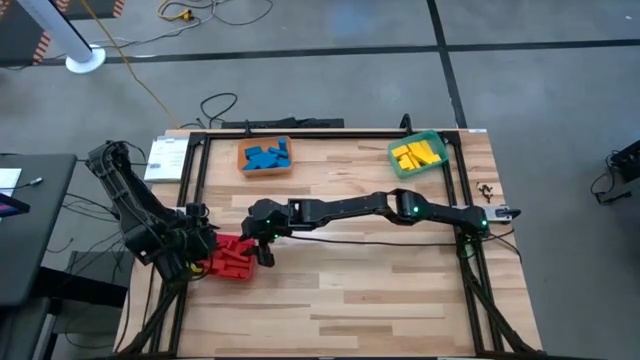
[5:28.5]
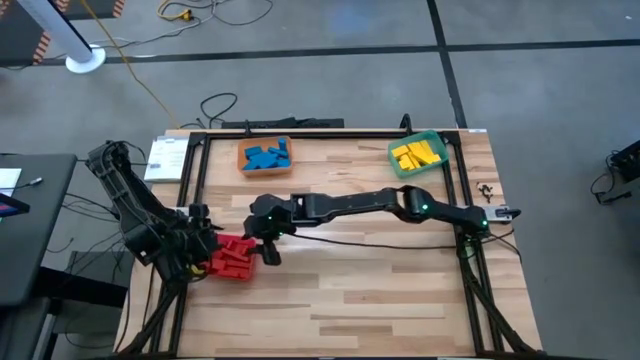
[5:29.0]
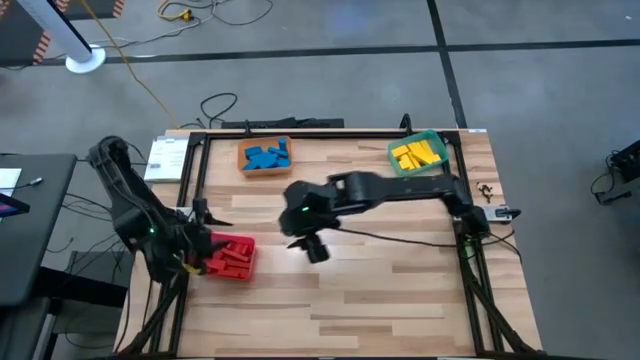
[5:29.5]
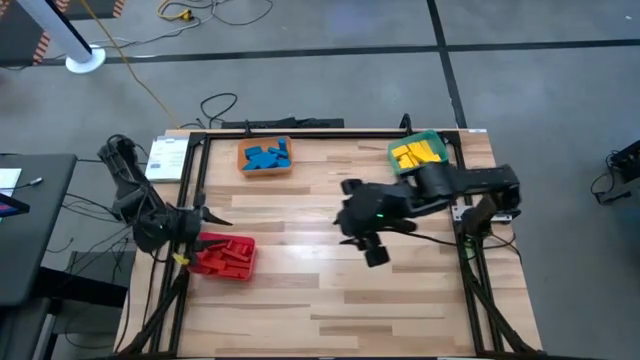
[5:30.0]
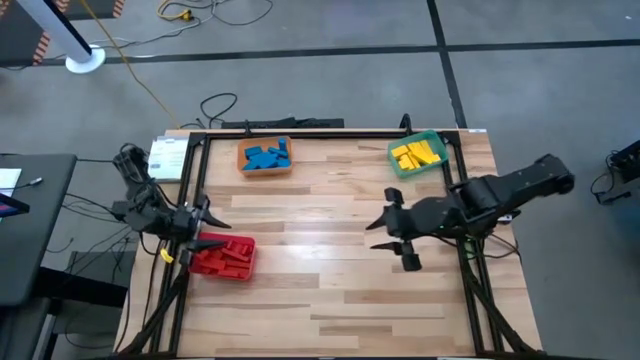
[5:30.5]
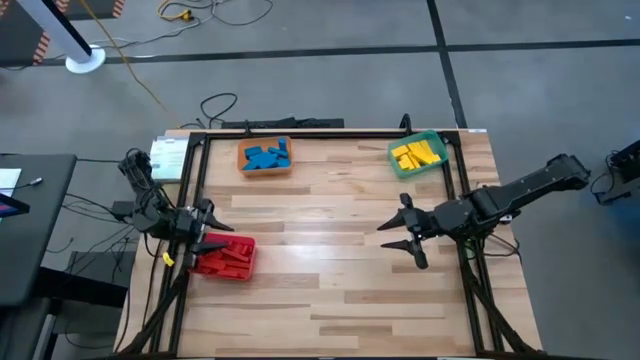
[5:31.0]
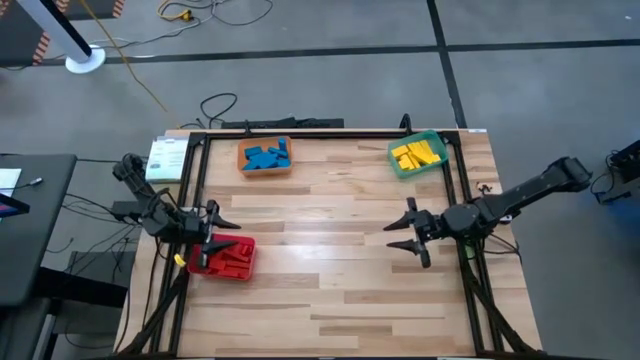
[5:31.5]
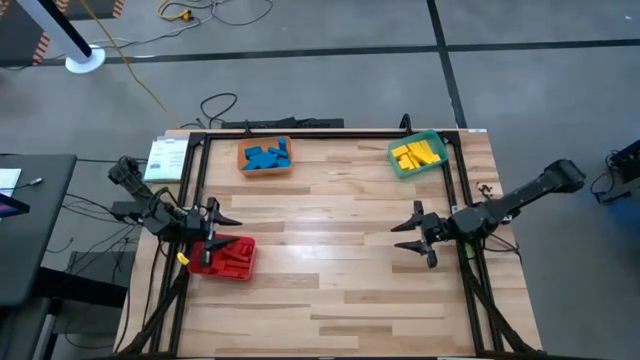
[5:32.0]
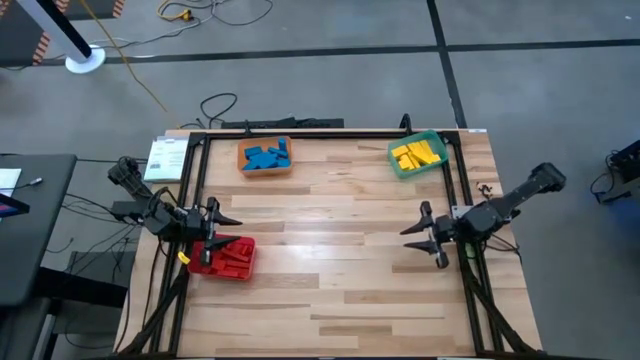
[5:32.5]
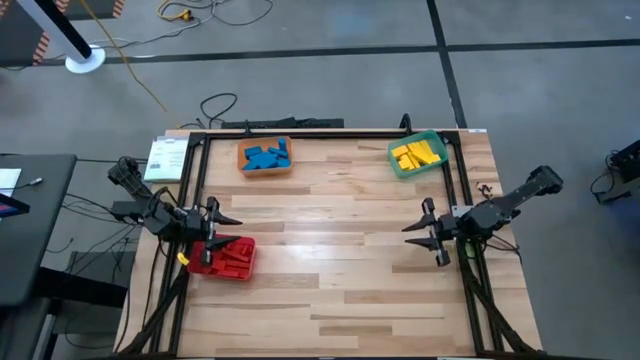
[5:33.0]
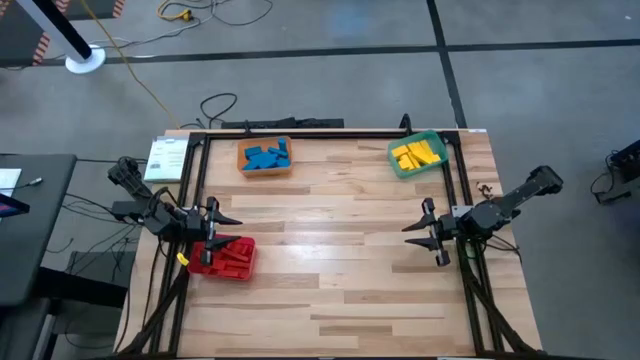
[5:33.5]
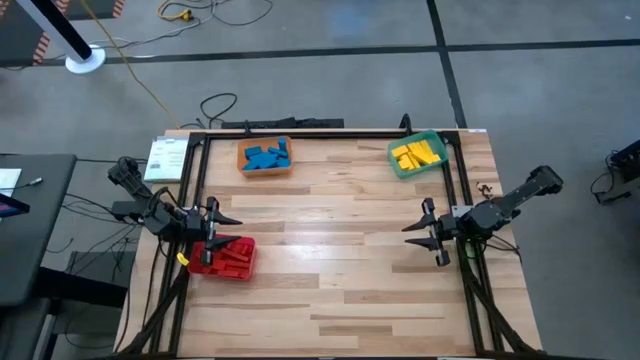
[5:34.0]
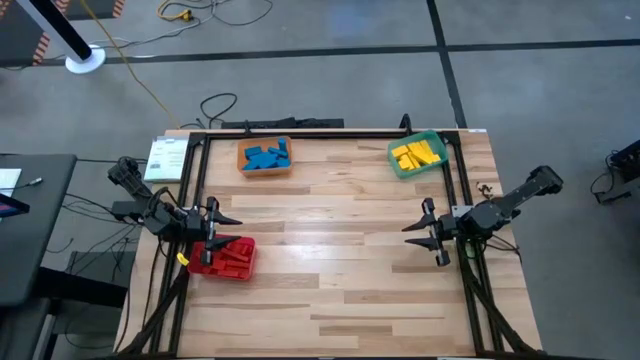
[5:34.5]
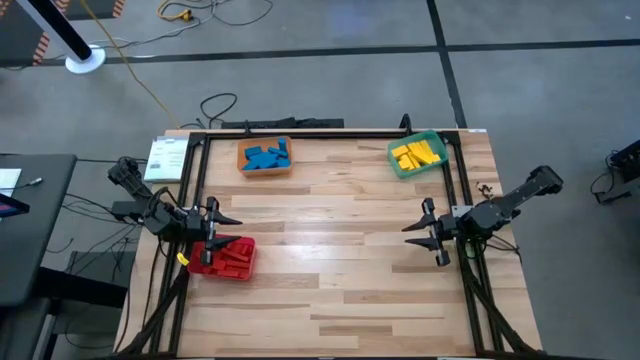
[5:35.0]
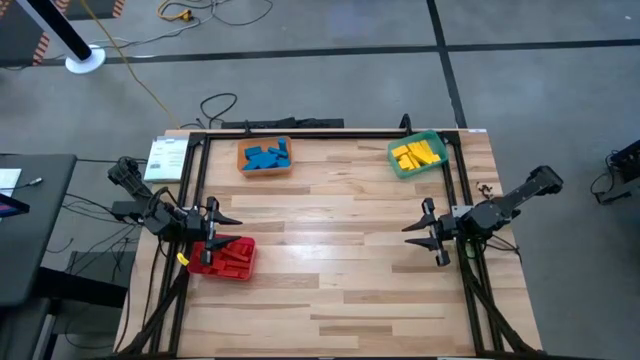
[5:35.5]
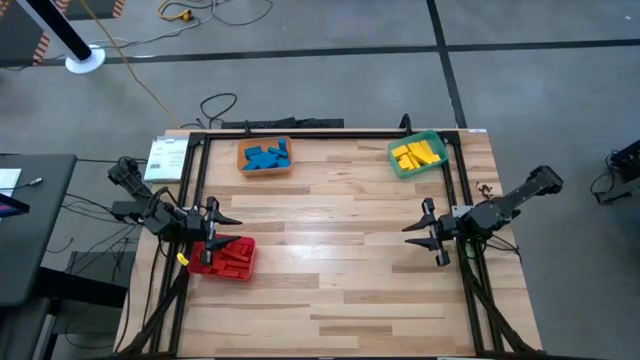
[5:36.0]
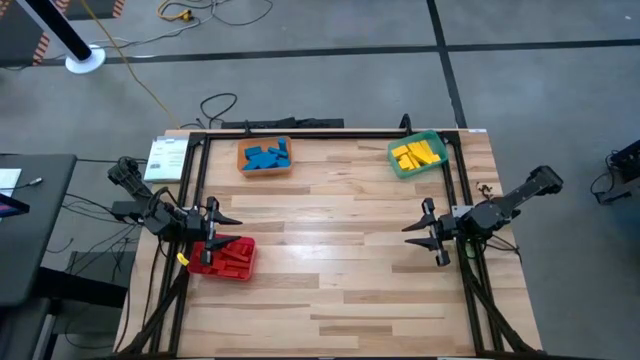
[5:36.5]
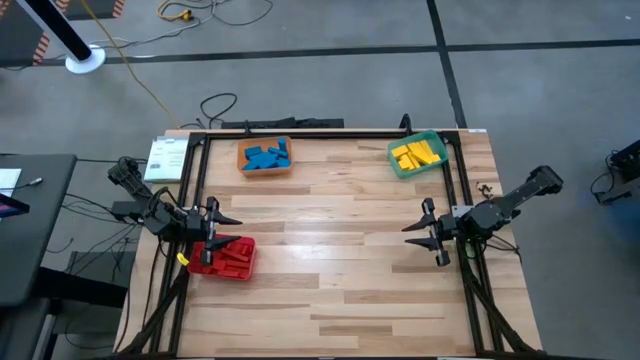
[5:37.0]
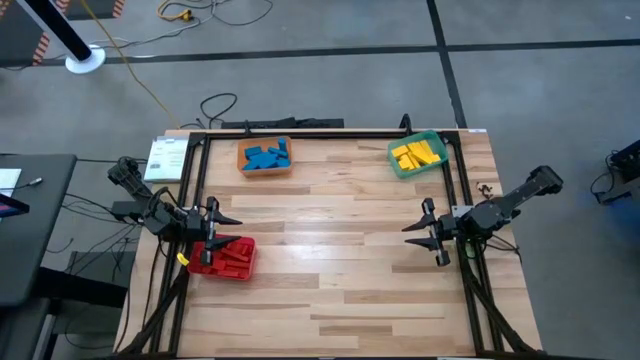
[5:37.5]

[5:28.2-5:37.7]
Task: Sort blocks
Return to Home Position

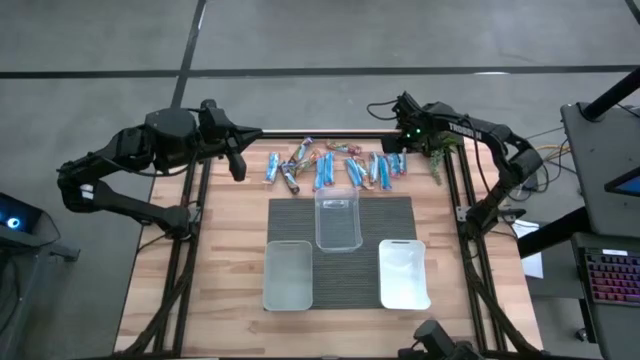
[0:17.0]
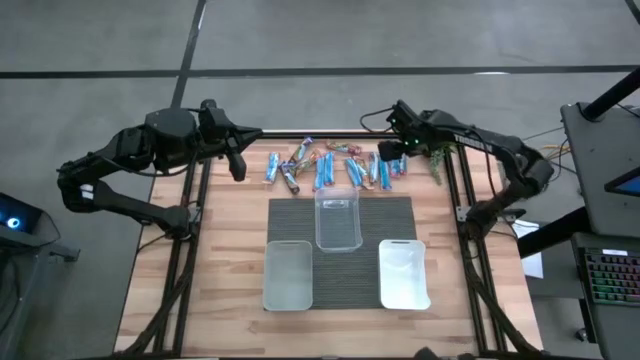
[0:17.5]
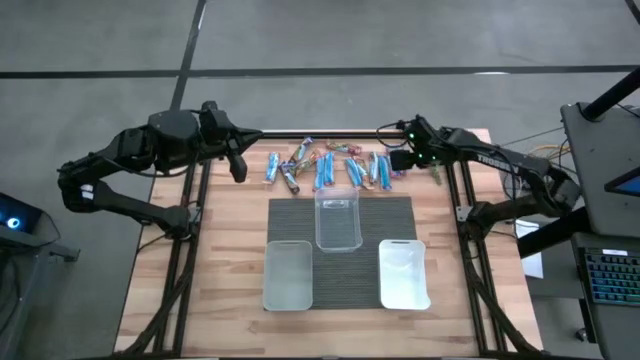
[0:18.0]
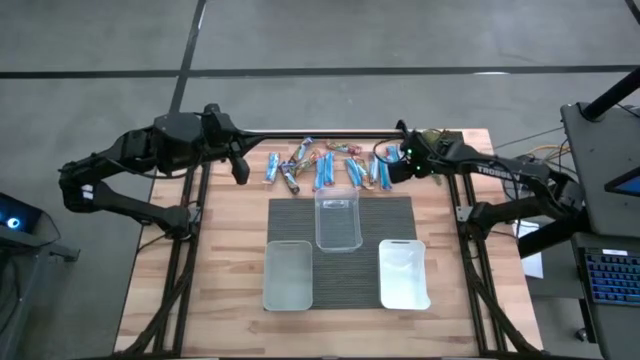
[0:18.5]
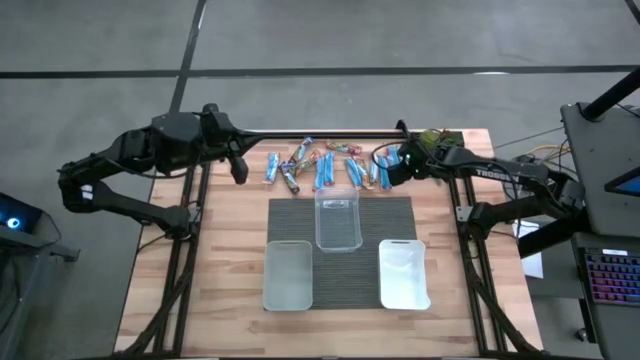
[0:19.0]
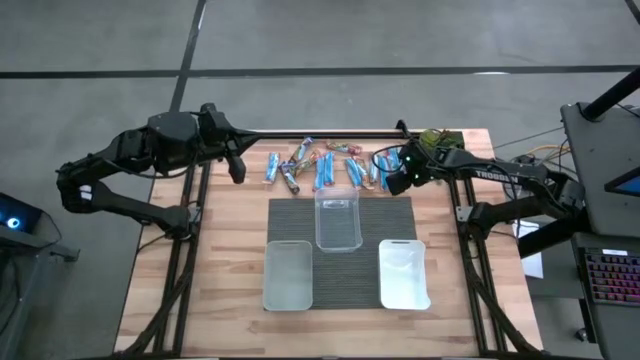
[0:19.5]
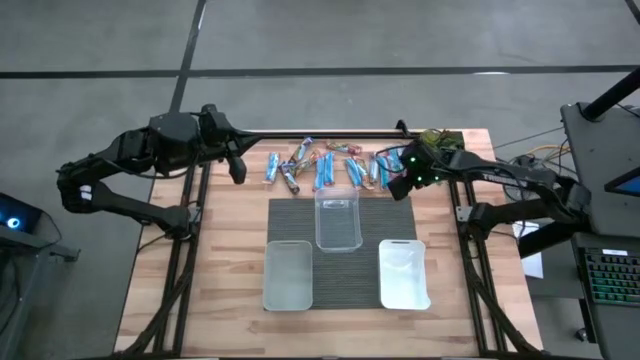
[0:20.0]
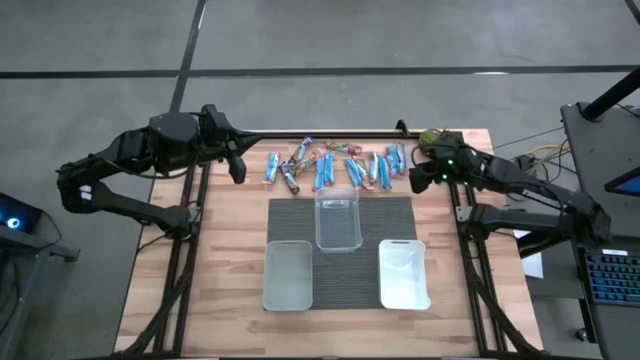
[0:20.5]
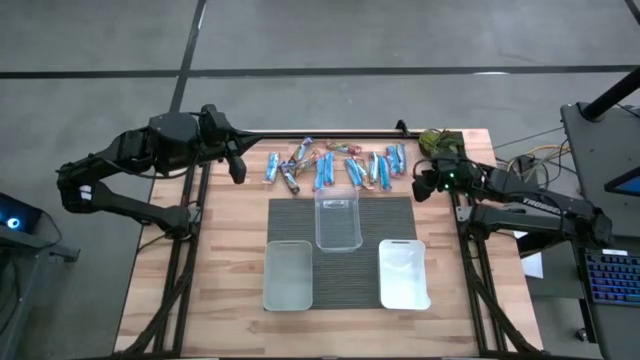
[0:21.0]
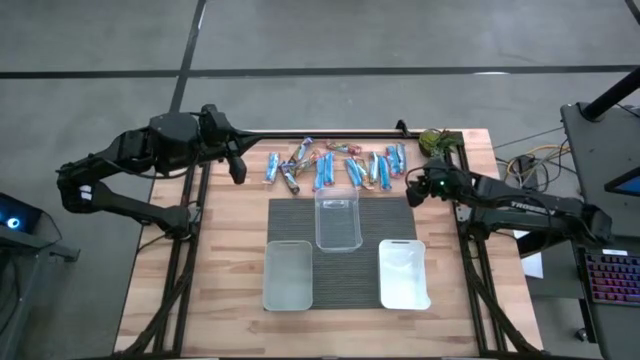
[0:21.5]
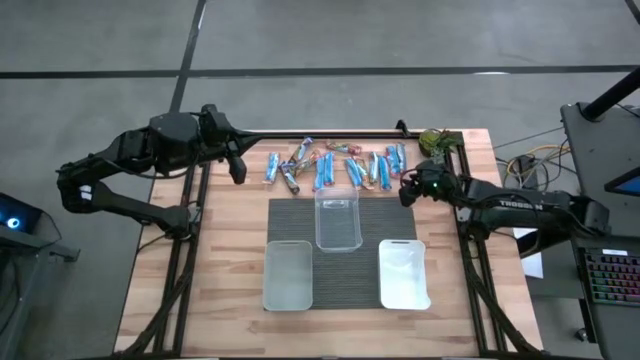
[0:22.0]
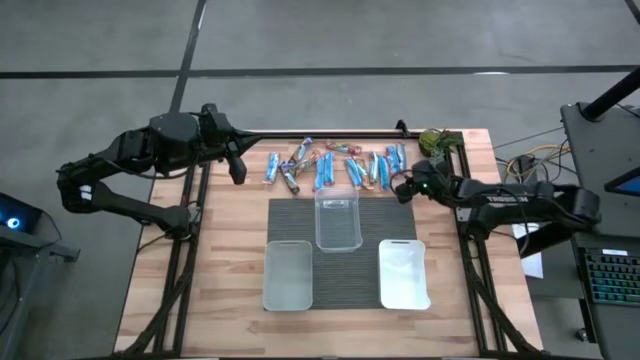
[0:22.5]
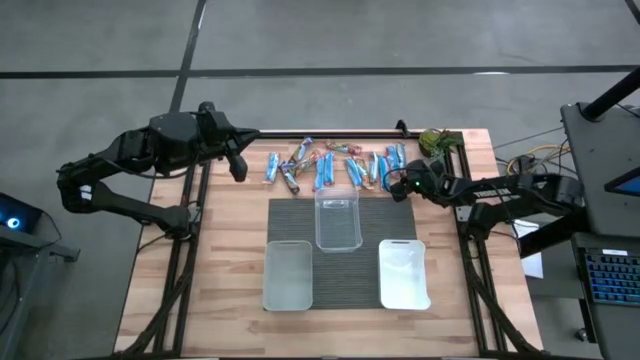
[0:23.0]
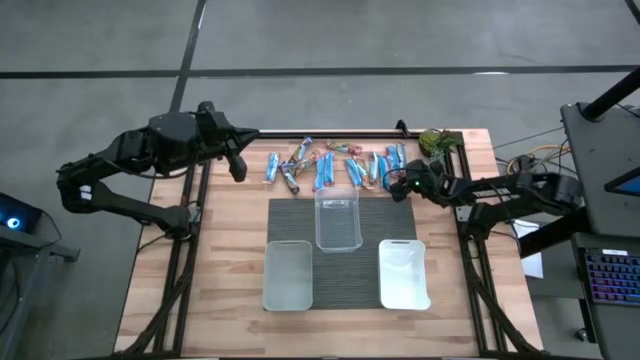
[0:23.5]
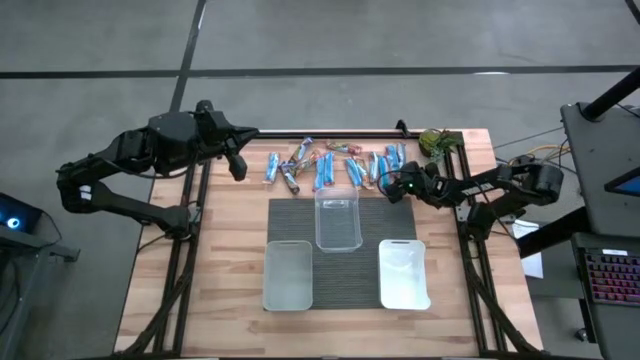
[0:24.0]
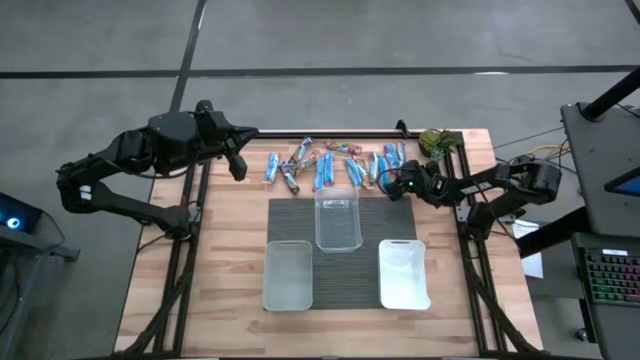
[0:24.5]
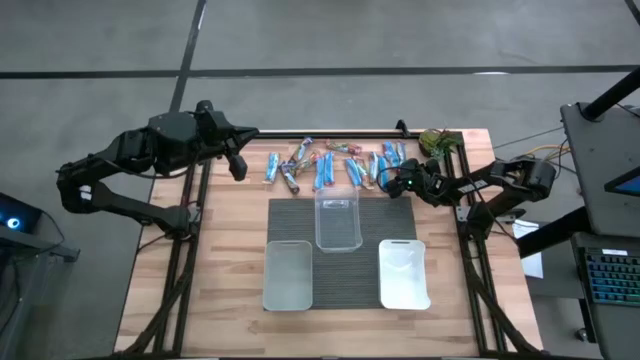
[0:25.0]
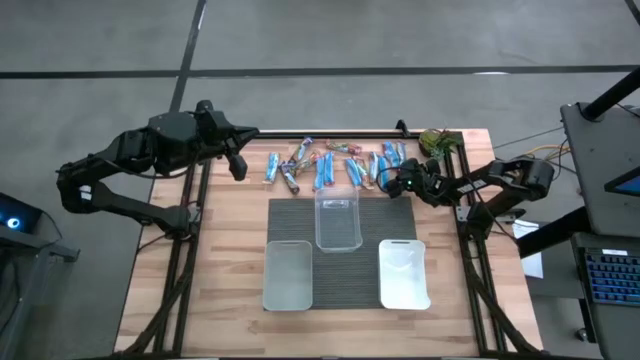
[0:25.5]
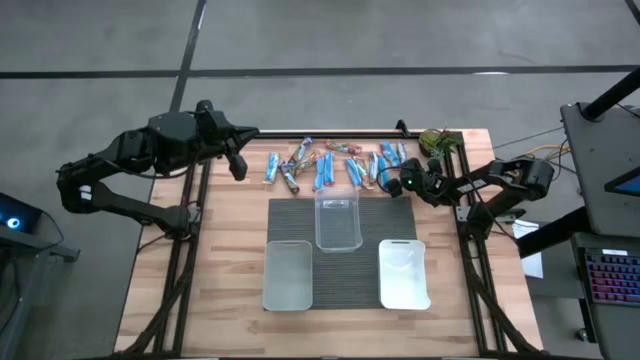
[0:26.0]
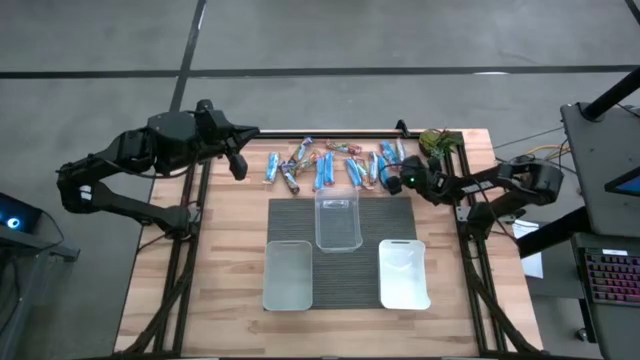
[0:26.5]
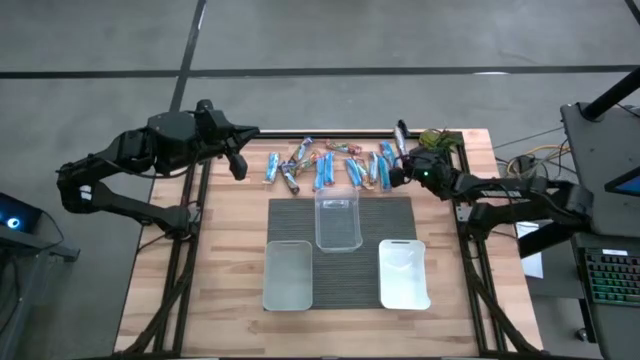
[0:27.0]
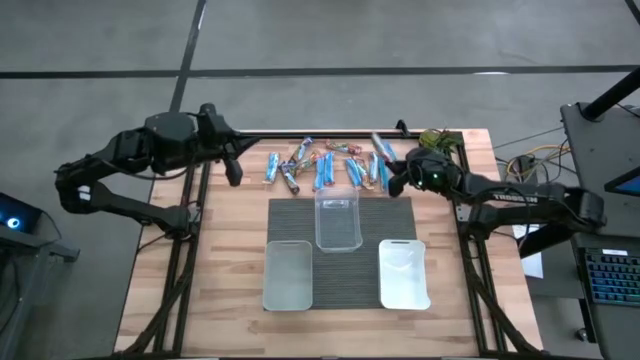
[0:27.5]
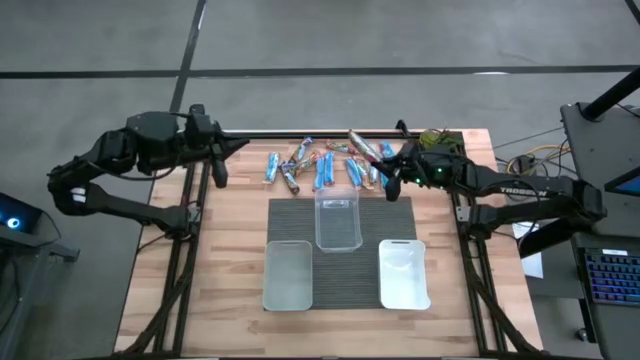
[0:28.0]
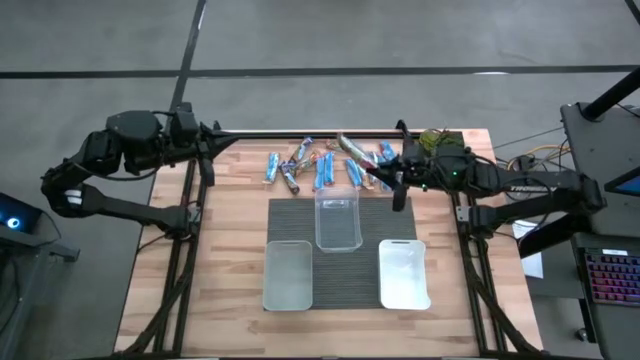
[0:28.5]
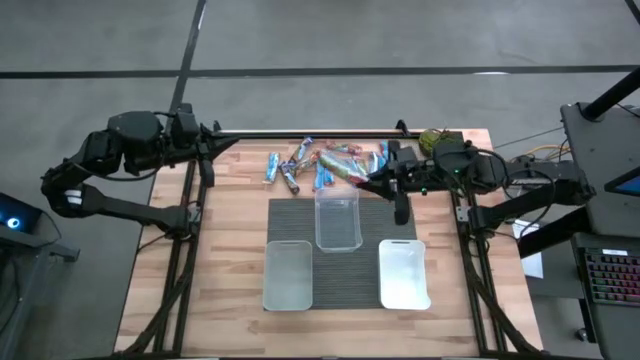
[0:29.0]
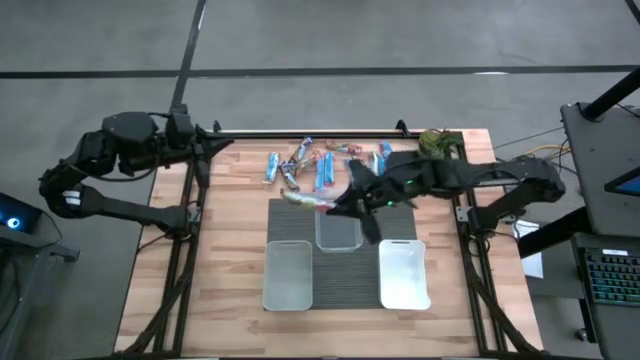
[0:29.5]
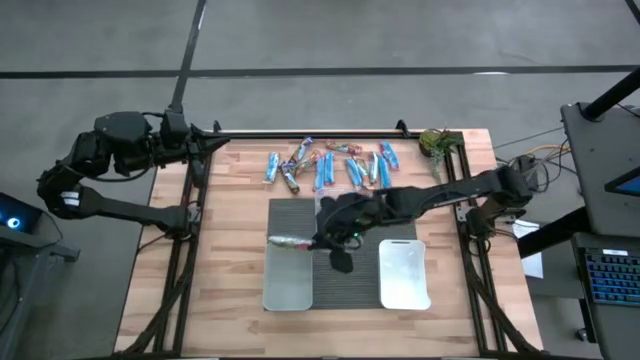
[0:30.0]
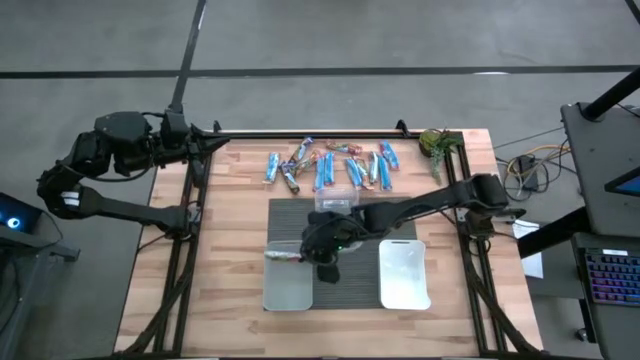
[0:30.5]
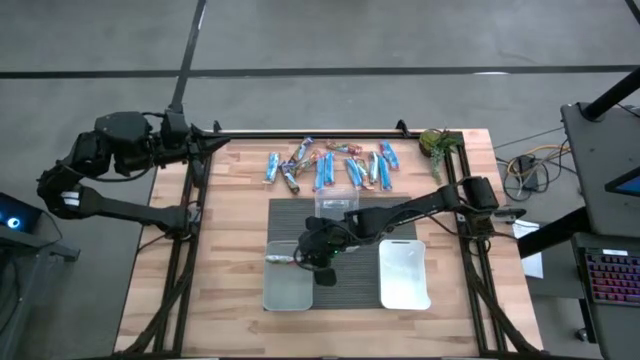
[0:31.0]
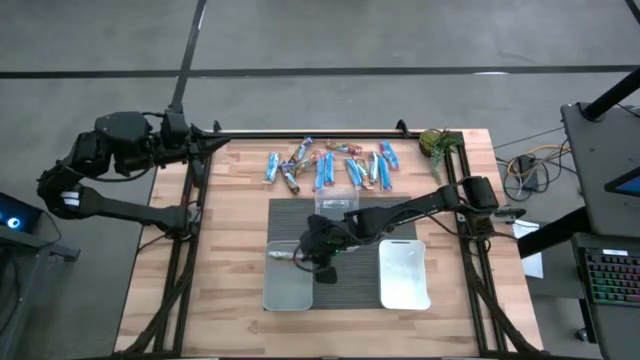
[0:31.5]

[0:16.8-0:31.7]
Task: Pick and place Granola Bars by type
Put the red granola bar into the gray bin
